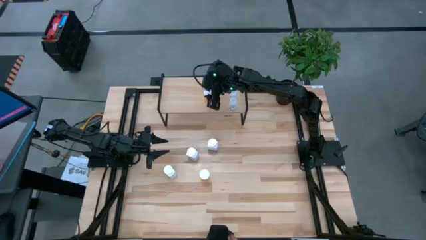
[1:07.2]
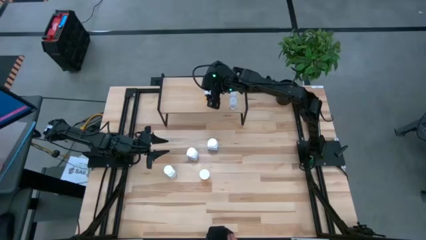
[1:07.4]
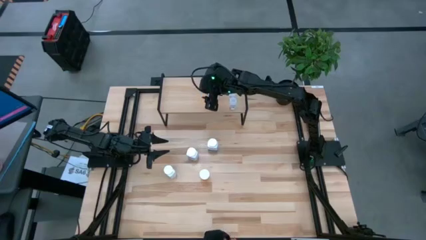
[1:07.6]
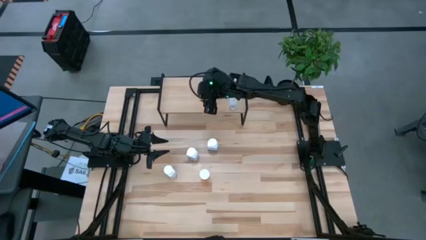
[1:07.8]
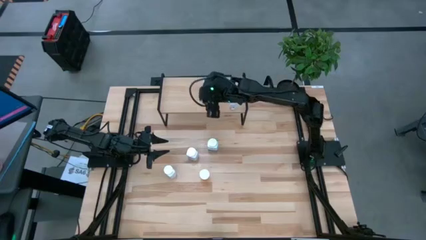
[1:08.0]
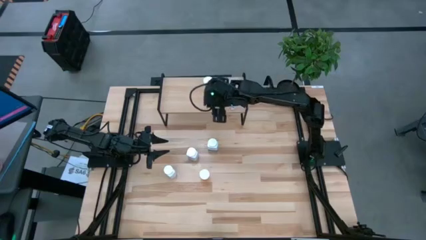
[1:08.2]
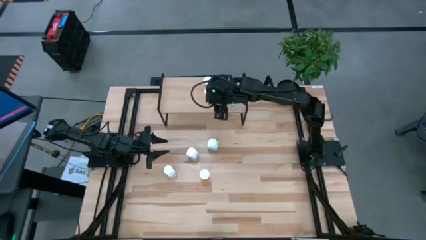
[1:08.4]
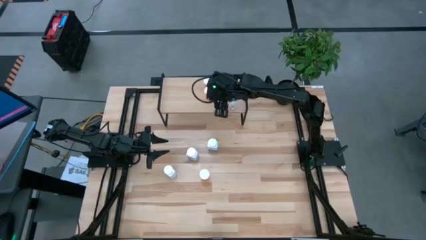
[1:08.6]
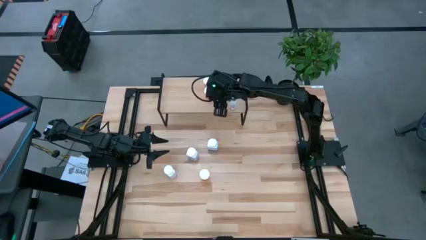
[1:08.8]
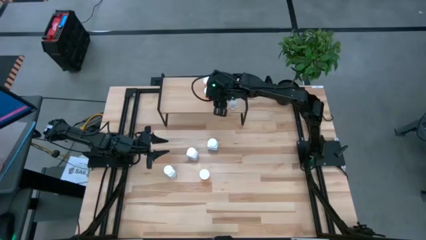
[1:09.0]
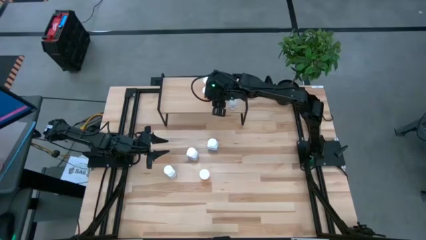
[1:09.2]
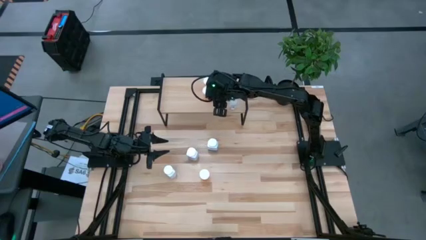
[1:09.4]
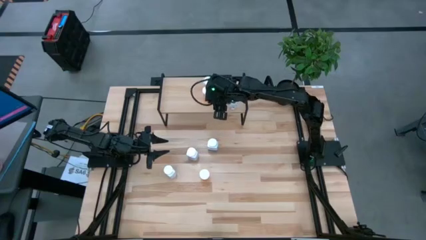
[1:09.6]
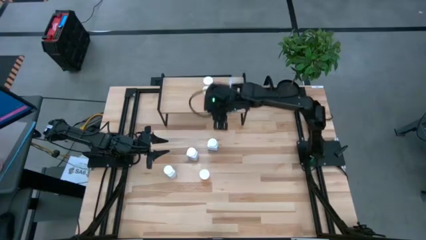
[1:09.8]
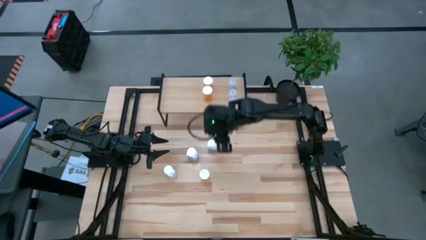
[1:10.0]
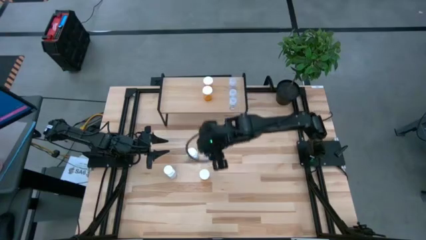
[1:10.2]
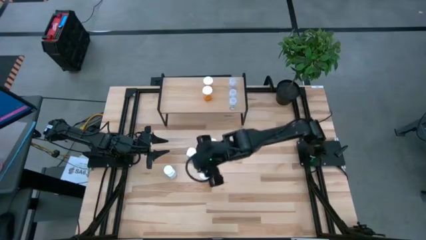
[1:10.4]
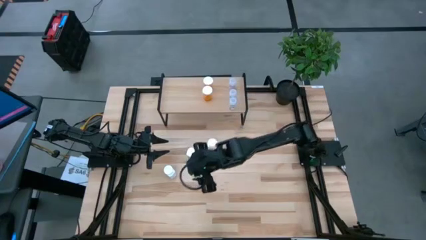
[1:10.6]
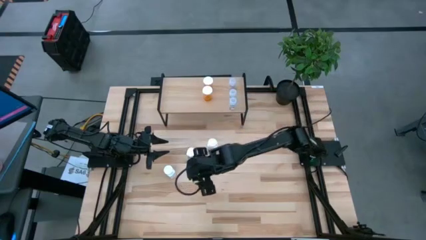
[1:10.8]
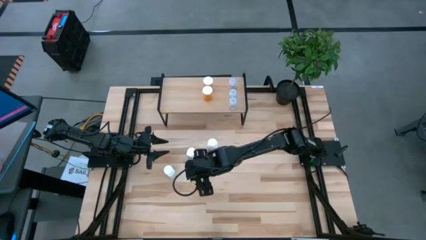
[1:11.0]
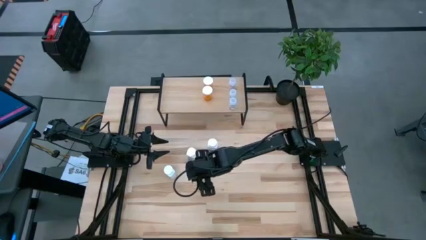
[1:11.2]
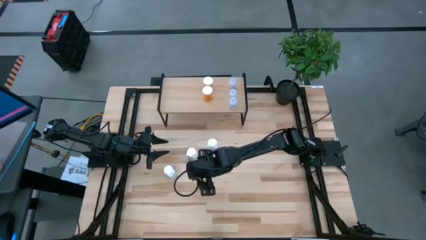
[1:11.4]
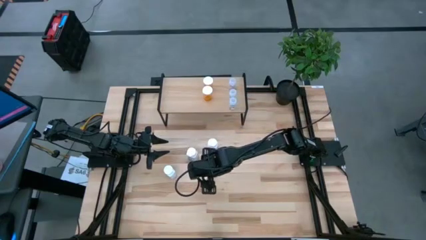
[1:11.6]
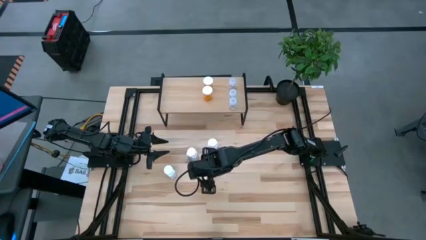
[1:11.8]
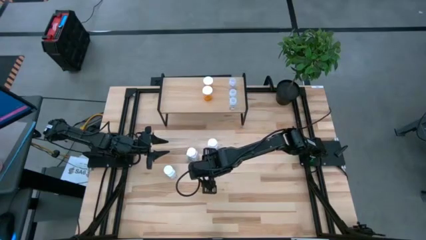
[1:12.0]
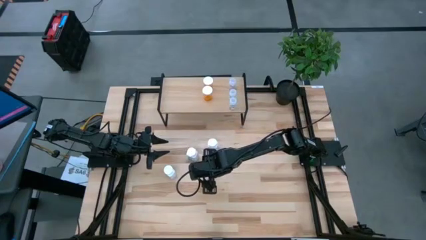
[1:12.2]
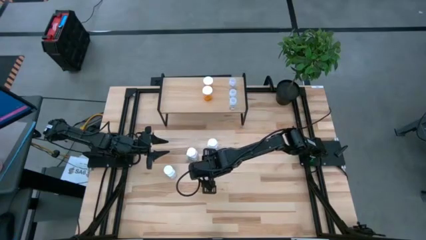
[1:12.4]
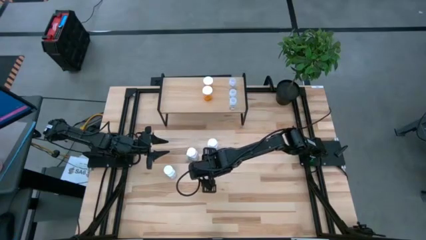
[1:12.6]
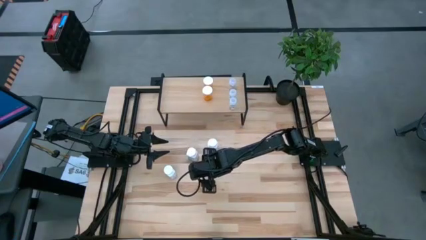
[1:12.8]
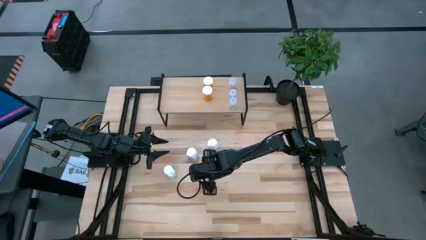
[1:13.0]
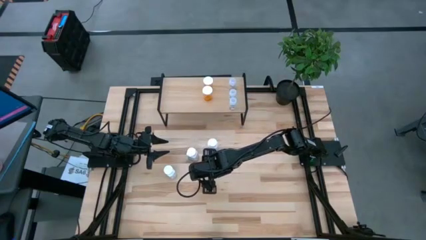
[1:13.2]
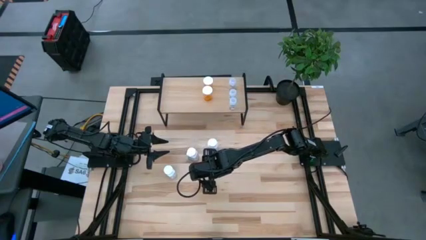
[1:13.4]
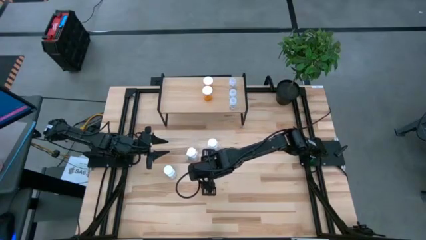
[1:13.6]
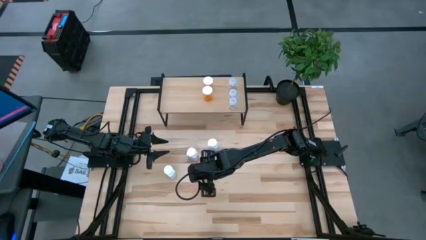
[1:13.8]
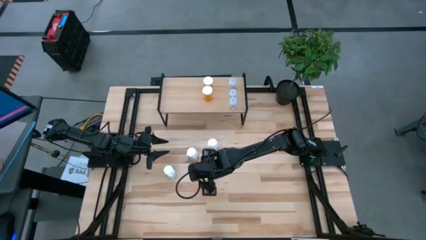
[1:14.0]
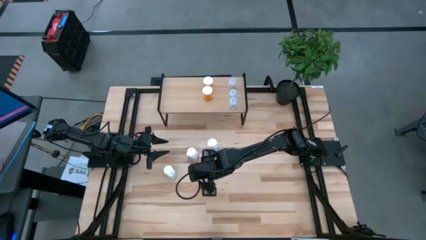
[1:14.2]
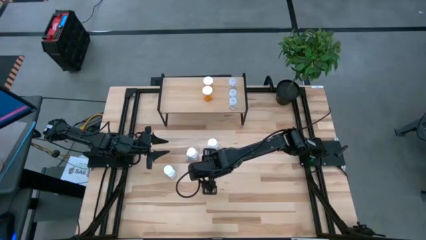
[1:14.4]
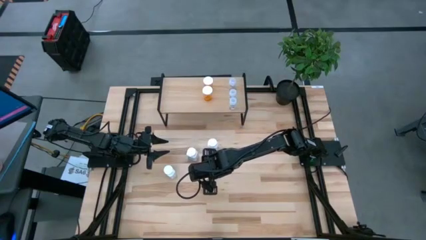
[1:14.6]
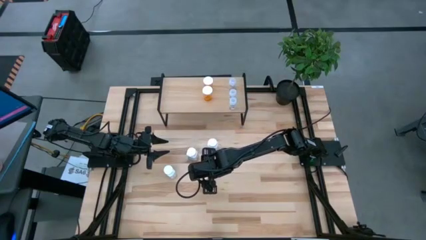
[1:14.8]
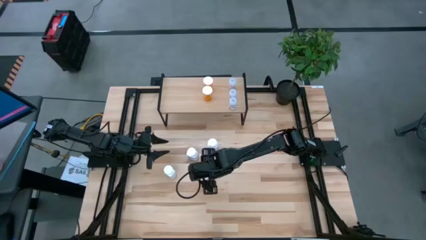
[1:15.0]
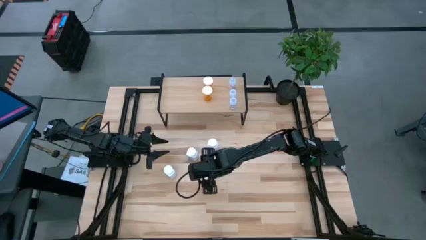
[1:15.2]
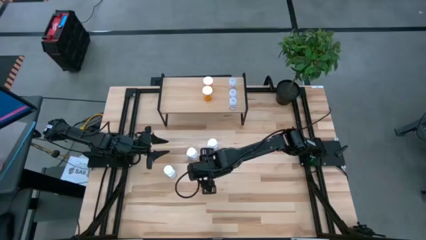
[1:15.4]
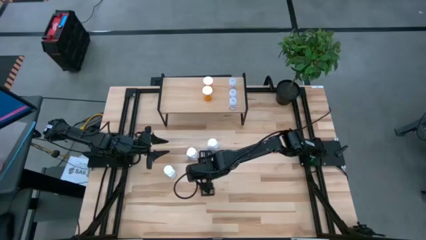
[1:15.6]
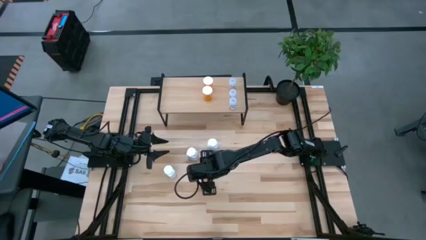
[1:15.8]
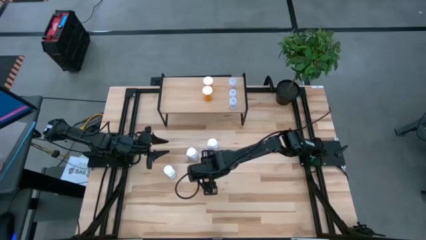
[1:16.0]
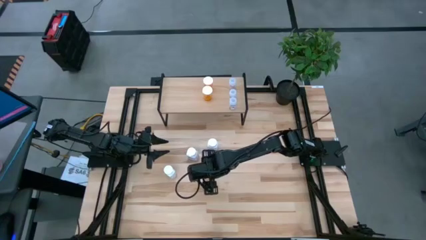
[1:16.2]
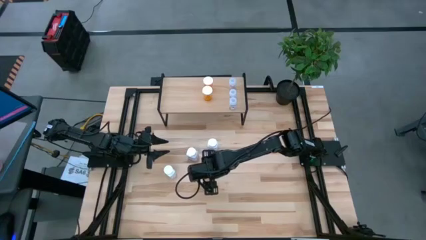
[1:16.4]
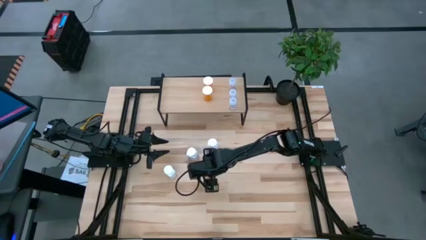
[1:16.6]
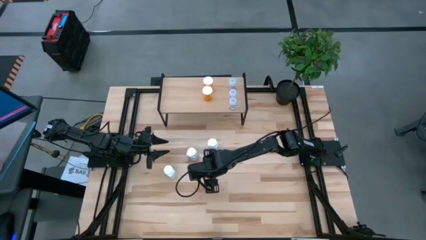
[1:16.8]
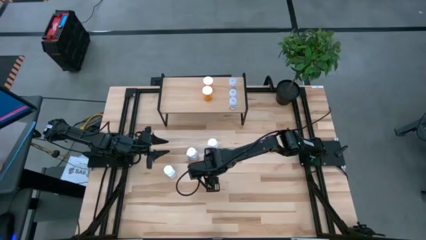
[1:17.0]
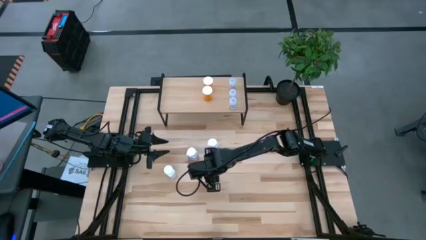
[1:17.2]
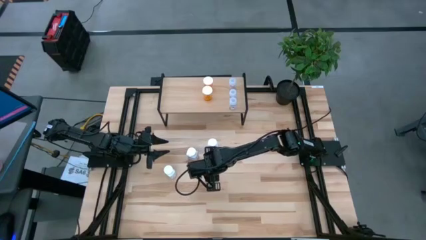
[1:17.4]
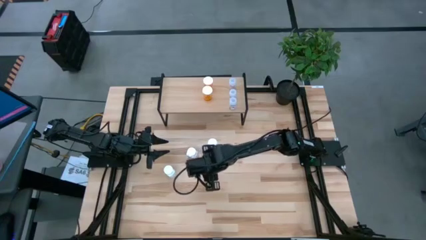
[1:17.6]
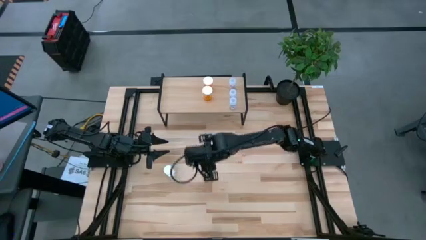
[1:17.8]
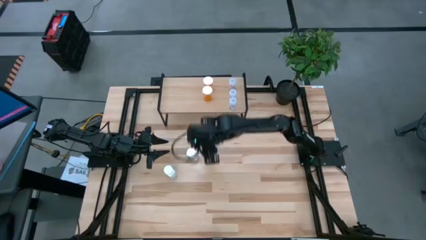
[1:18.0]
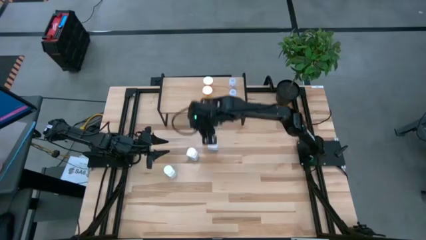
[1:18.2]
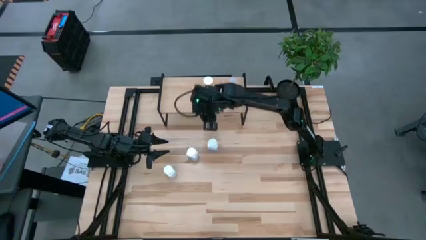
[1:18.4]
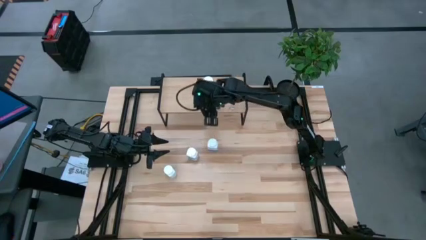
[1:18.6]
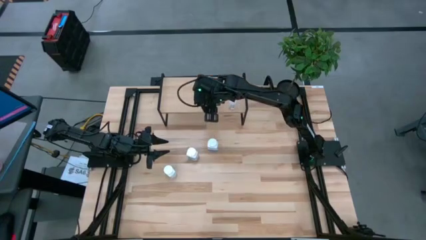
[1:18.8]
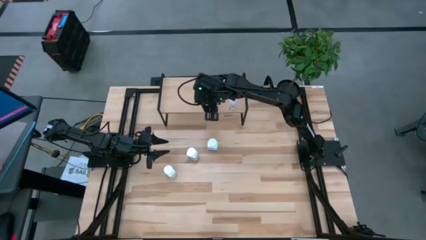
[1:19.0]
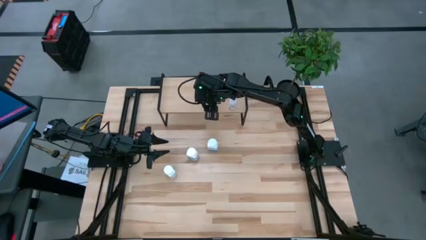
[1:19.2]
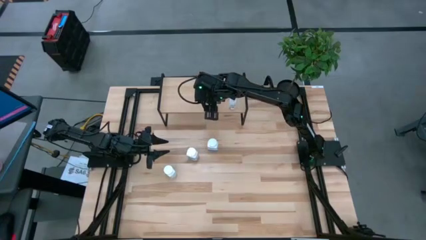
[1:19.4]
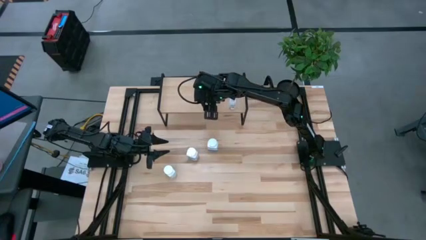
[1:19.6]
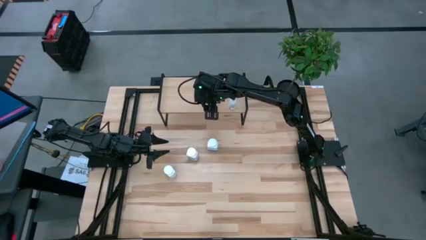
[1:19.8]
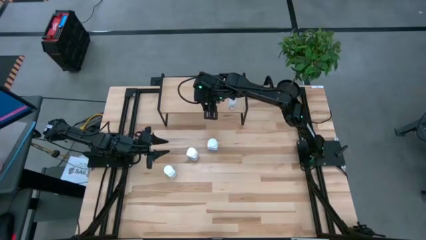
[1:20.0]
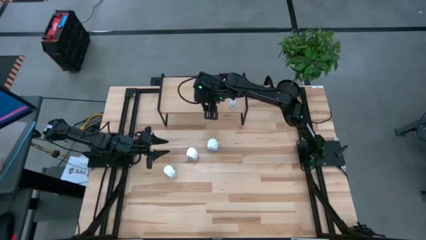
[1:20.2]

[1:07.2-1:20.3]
Task: Pick and place medicine bottles onto shelf by color
Put the orange pill bottle aligned with the other orange pill bottles on the shelf
